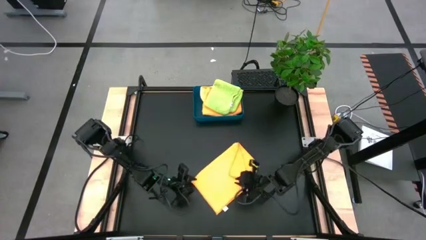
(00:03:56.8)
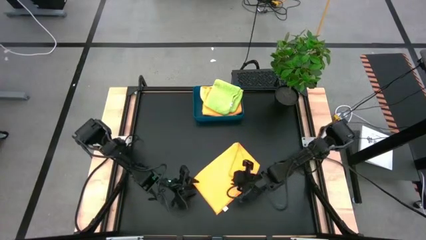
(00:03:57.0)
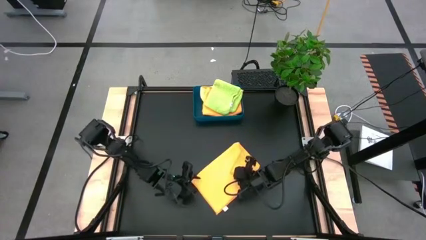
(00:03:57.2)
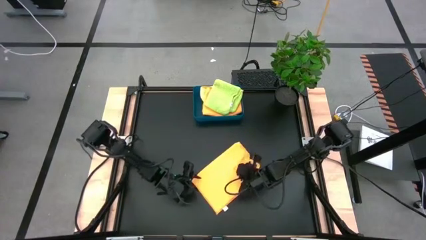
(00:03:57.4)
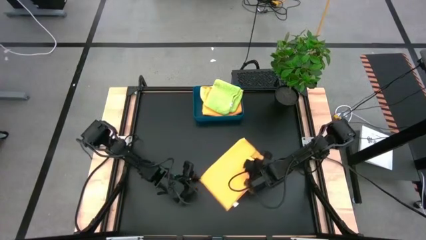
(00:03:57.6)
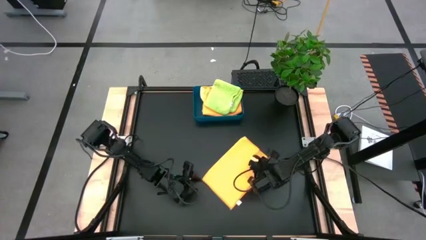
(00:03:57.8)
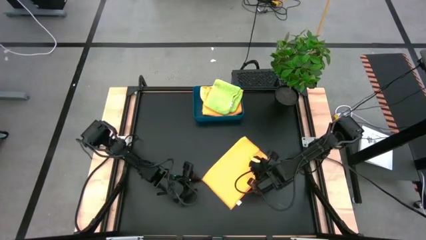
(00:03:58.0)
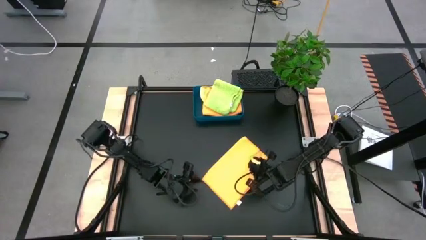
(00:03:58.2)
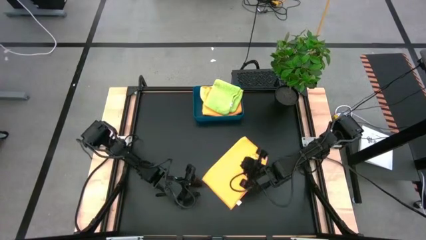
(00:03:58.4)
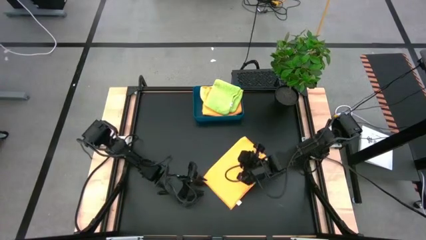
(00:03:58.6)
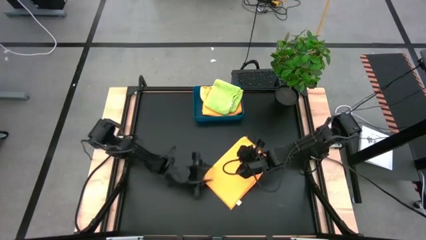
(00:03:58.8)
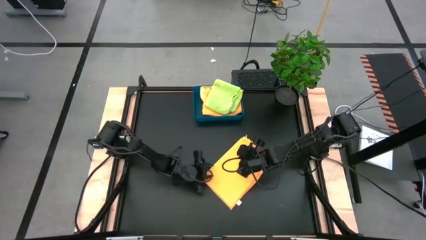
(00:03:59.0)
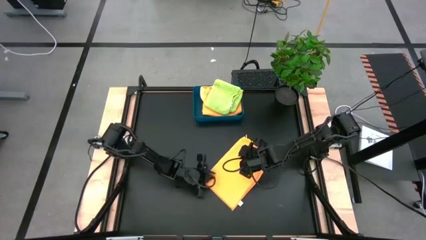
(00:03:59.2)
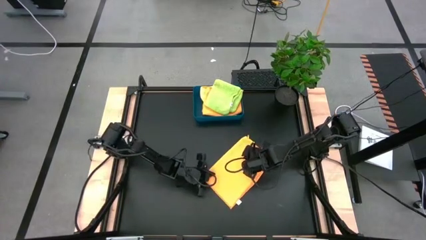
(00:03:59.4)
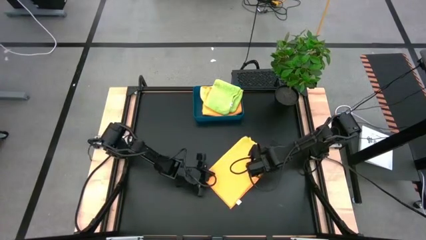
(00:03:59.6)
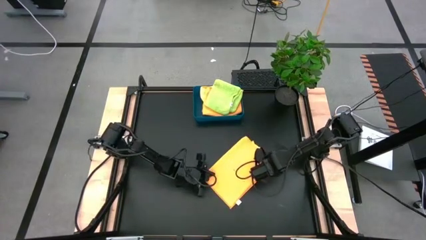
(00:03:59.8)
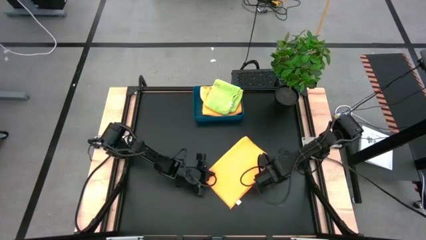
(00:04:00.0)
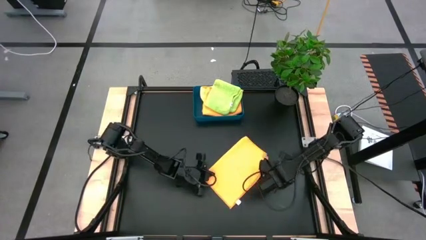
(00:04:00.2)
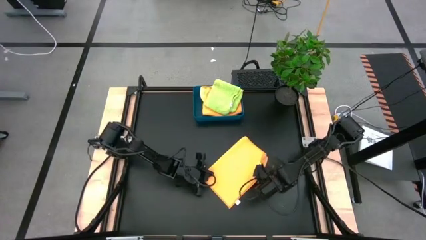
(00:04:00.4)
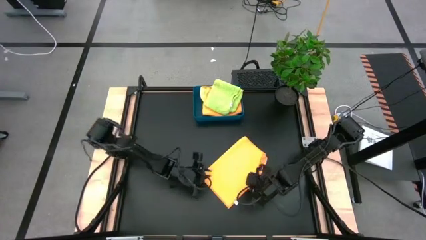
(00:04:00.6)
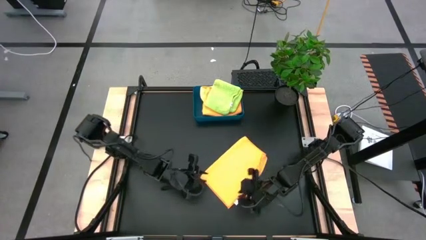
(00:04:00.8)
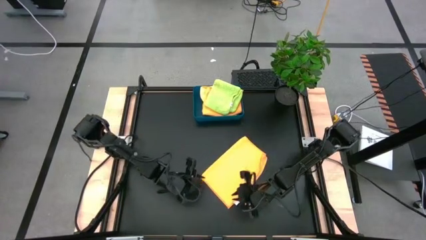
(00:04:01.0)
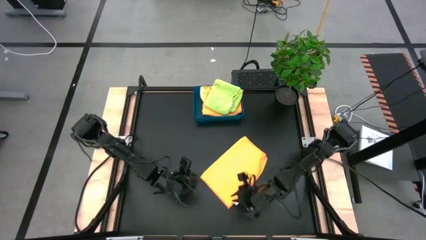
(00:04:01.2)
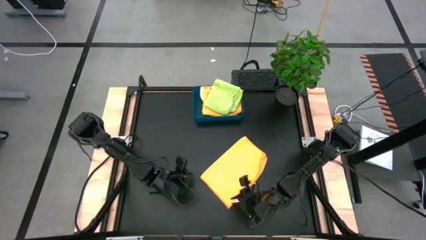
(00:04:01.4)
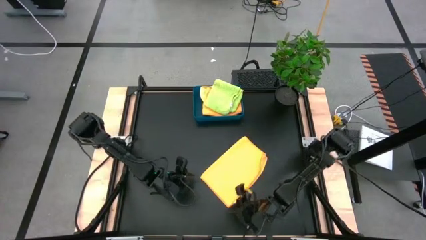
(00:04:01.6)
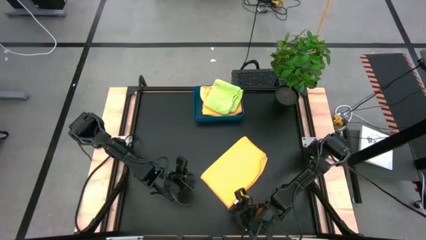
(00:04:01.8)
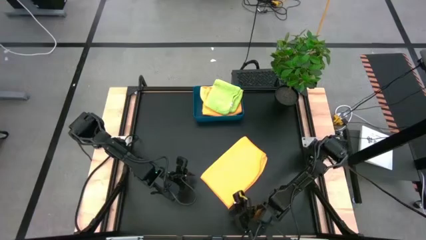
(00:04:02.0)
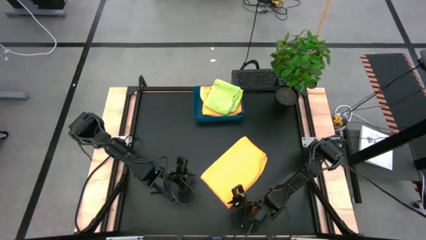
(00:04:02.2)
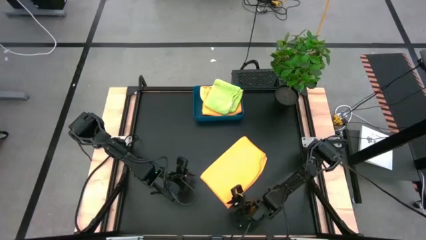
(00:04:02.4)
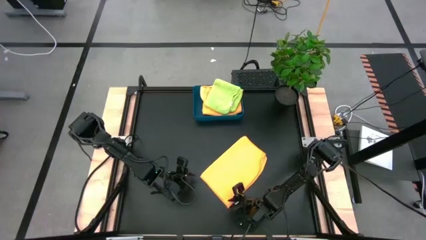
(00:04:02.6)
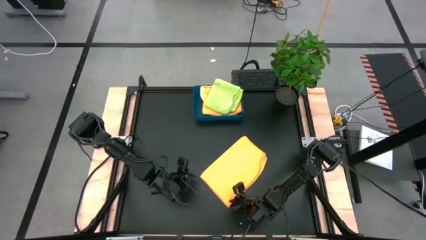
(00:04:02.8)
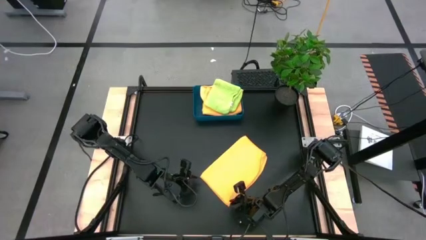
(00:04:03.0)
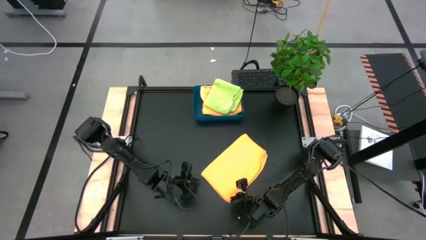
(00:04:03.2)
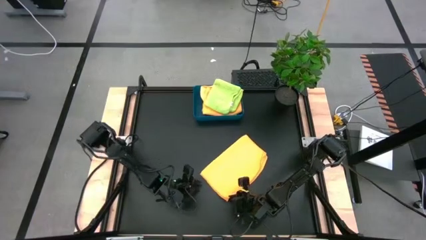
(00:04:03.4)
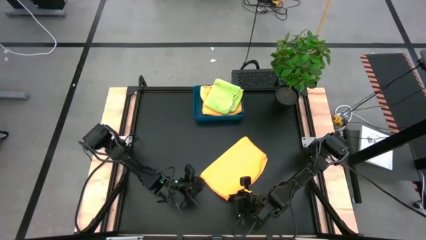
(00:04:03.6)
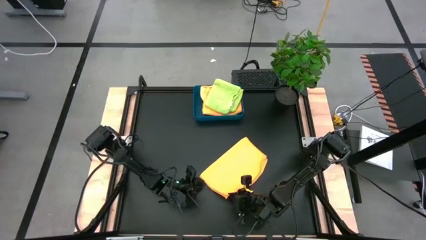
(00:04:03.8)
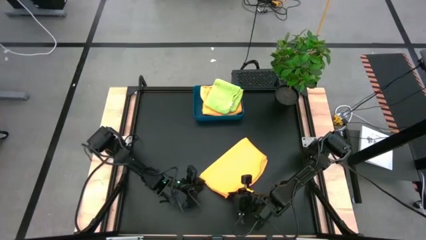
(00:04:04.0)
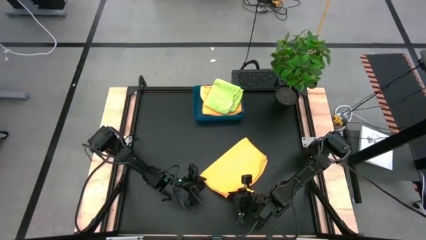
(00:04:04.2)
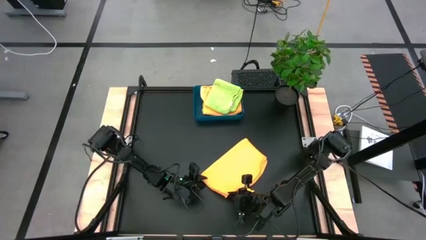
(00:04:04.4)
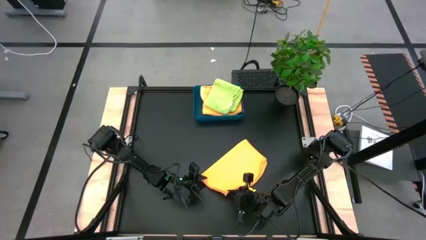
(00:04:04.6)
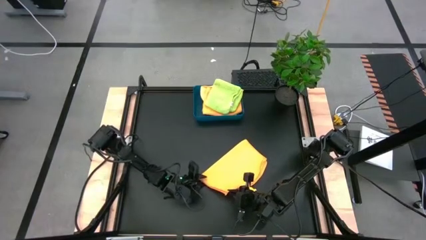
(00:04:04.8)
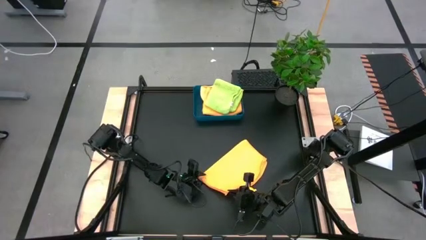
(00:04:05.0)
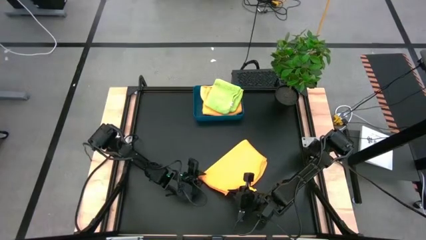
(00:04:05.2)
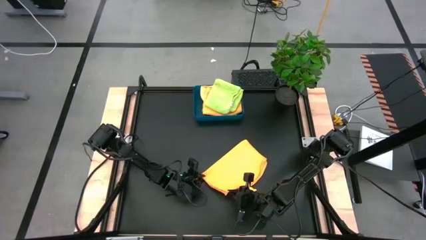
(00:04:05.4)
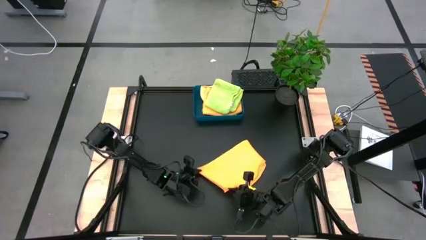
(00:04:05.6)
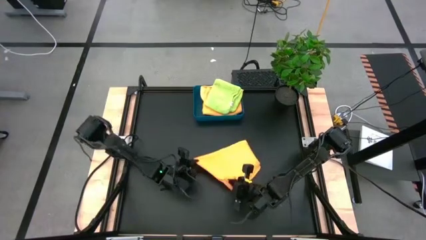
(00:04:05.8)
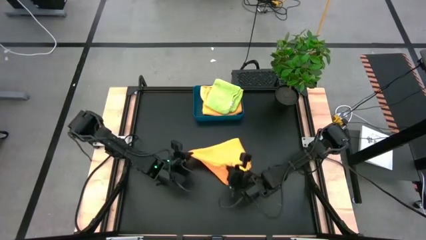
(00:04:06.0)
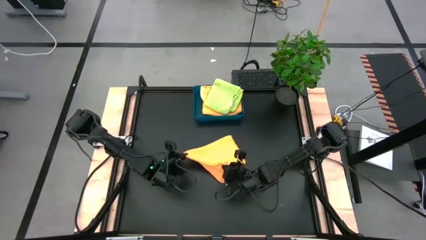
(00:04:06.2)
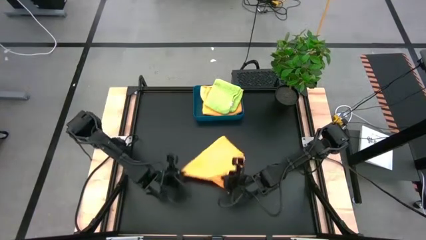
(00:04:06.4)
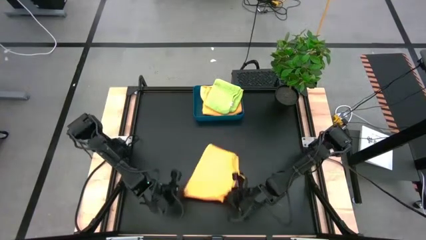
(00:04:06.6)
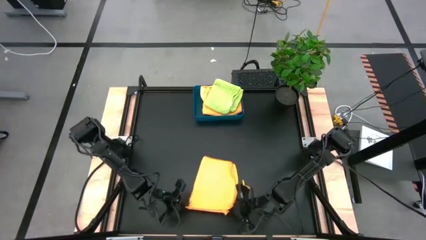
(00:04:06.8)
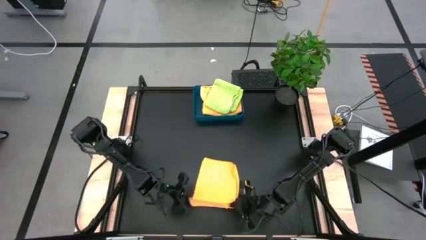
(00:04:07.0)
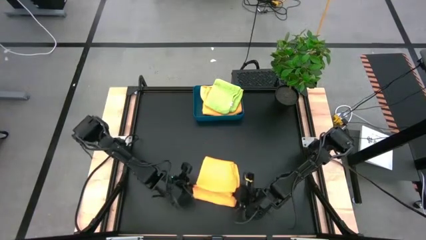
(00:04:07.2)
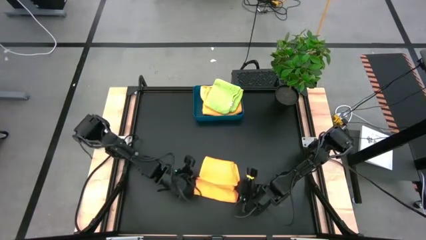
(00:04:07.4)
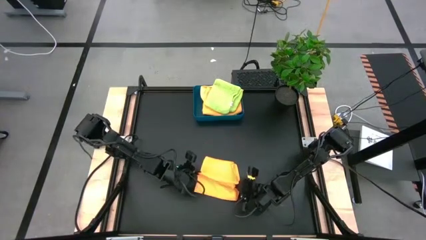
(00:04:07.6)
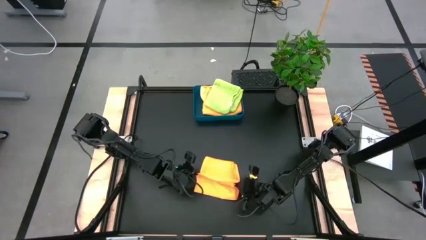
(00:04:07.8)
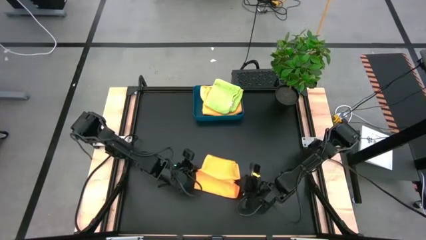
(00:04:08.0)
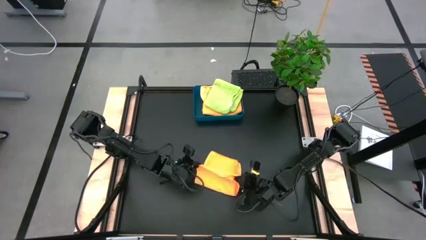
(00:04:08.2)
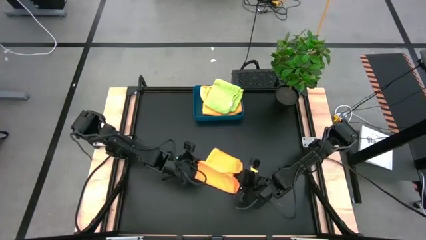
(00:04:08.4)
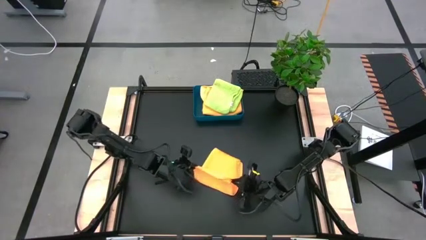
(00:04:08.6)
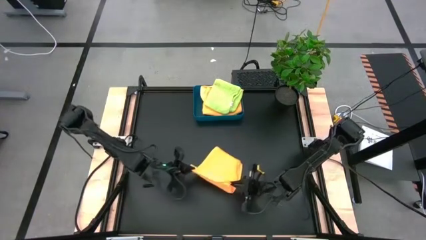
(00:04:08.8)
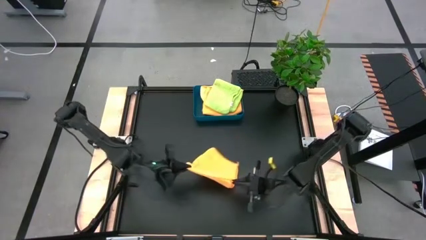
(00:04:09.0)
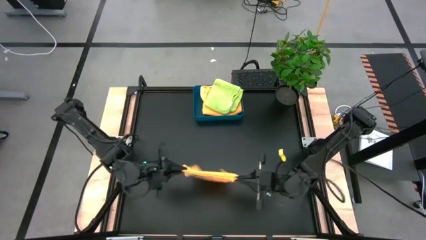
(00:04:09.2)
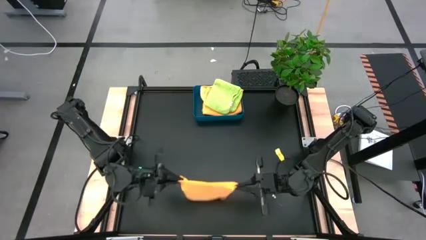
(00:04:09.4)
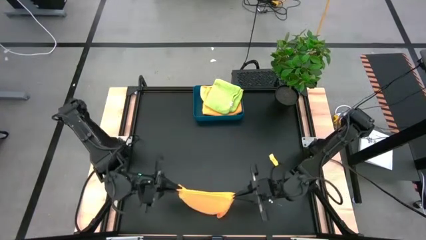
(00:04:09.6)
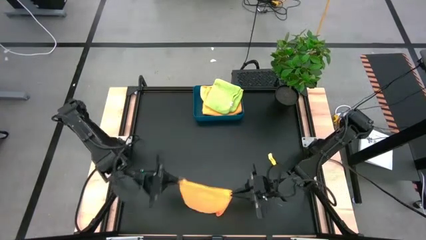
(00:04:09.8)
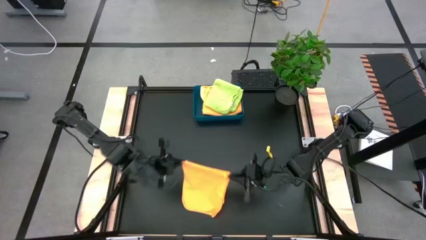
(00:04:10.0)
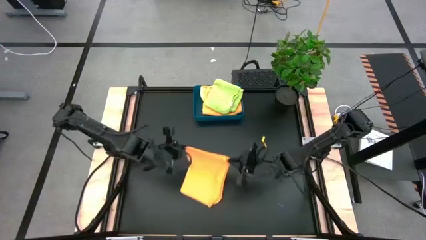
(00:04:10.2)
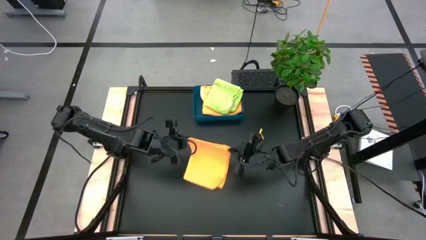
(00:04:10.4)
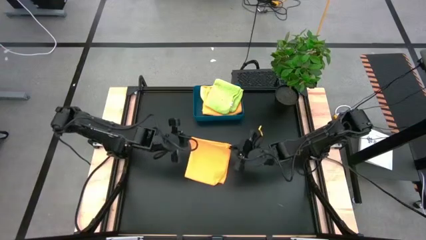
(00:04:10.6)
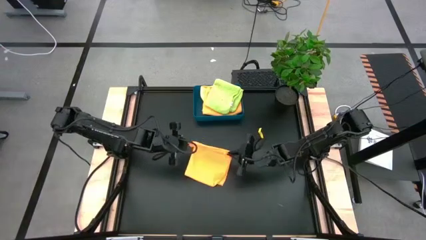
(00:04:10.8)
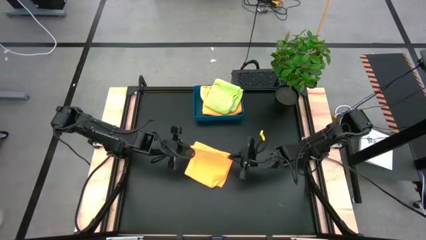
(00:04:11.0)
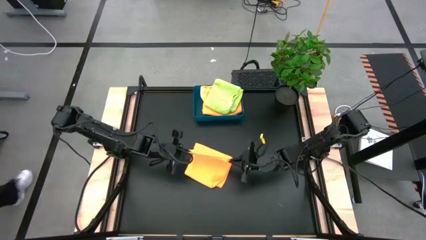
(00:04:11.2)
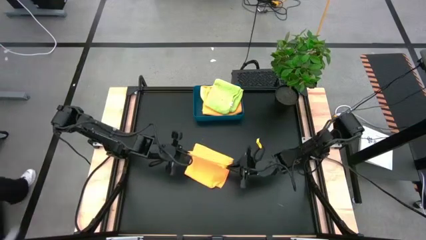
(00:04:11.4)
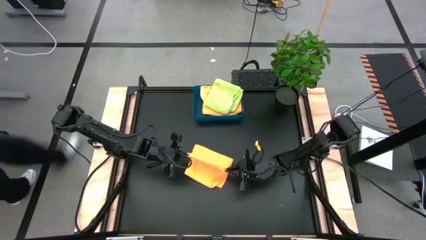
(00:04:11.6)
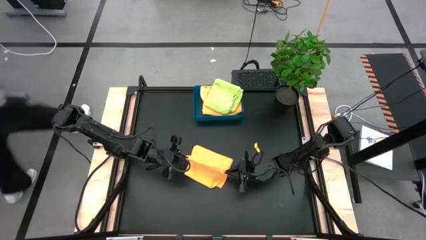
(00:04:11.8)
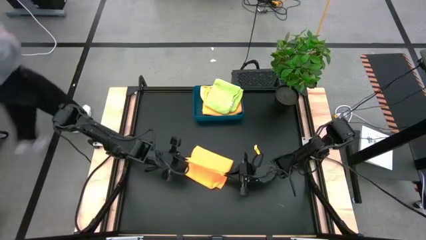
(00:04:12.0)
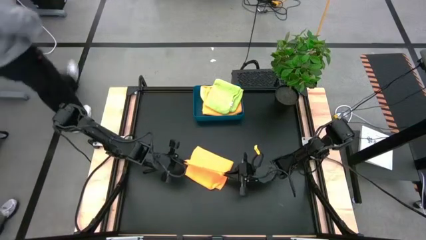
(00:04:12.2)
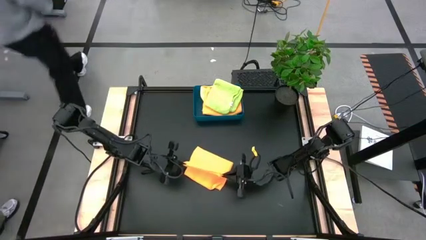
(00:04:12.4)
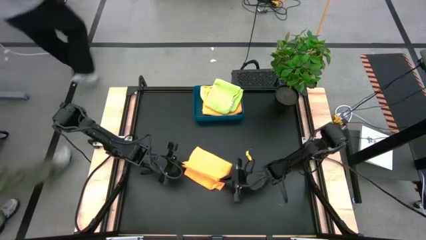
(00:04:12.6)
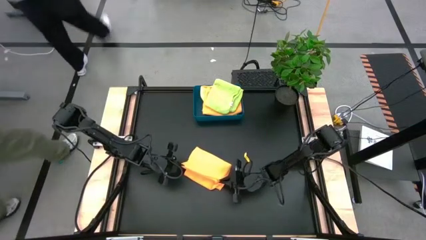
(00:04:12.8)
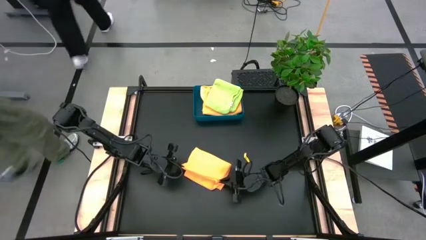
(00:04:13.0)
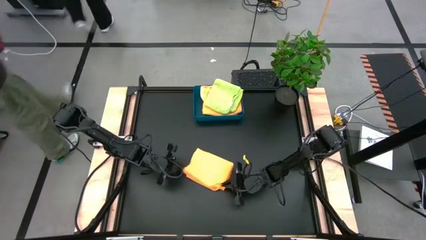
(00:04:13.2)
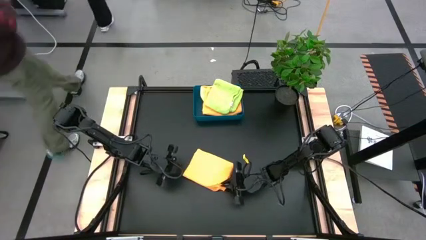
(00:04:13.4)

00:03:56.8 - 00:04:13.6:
Task: Fold microfiber towels
Fold the orange microfiber cloth
